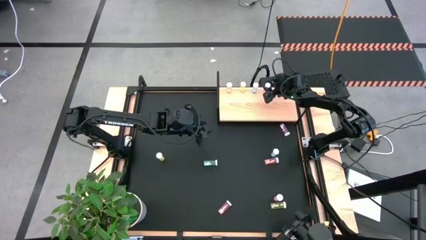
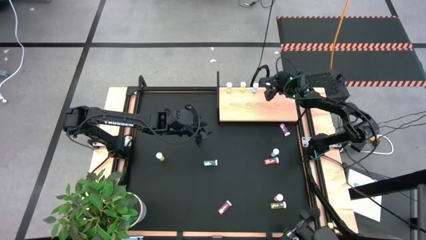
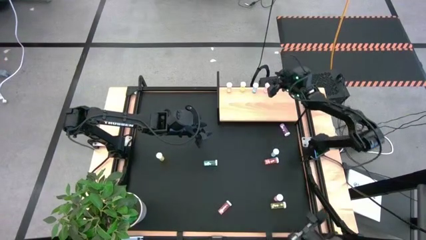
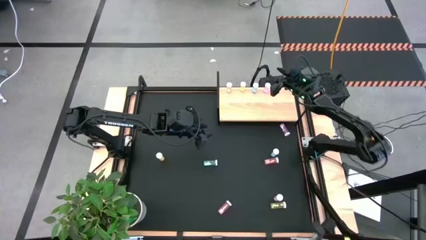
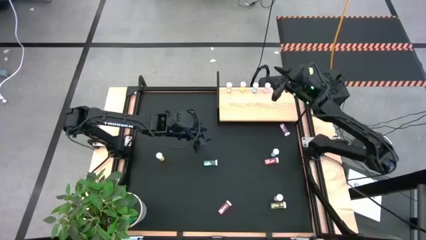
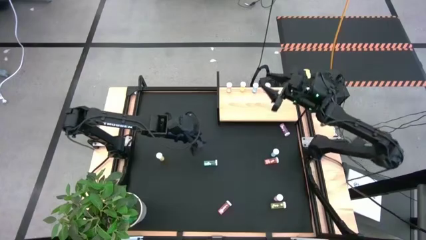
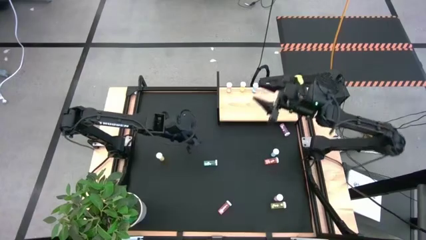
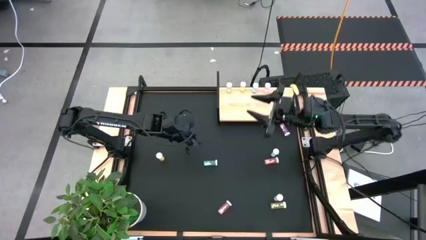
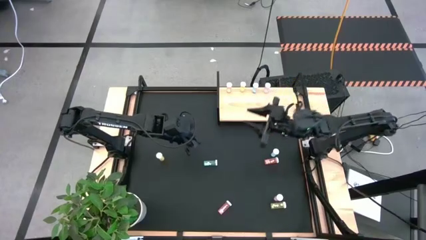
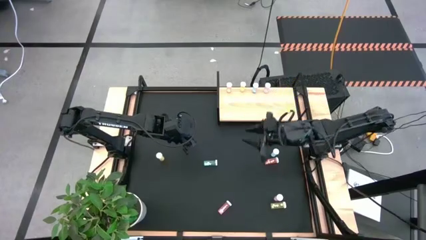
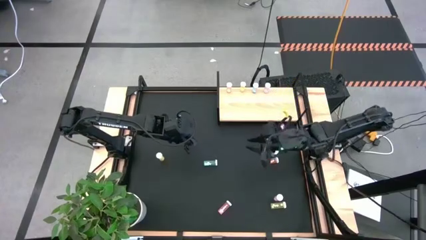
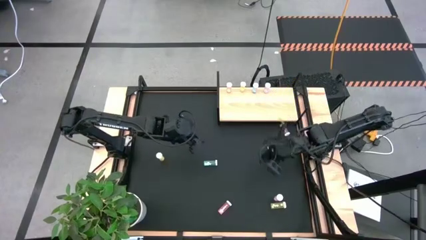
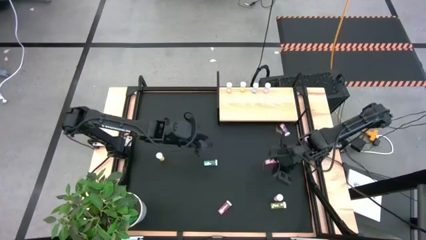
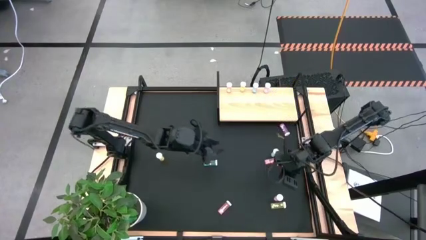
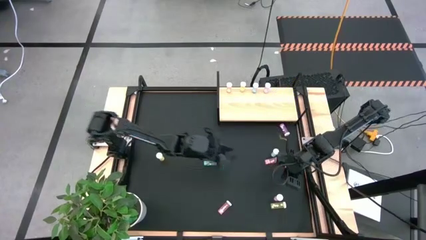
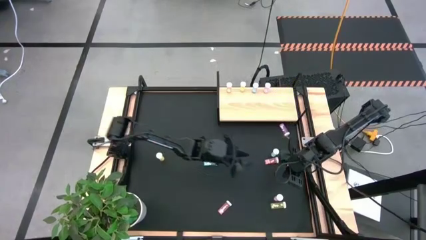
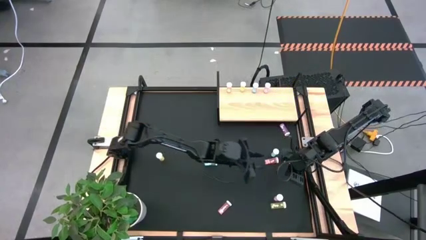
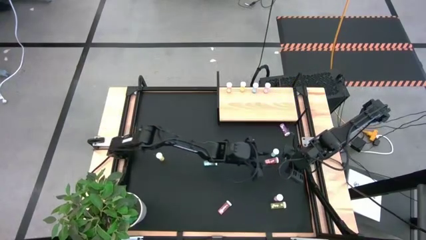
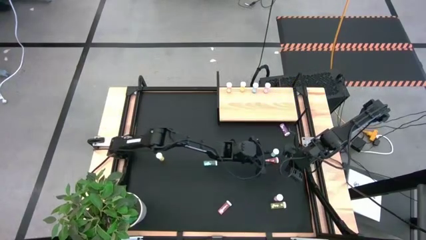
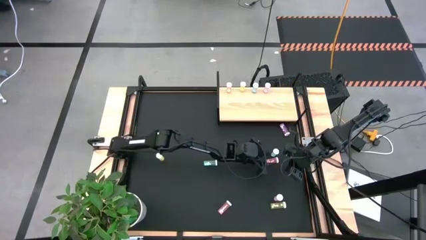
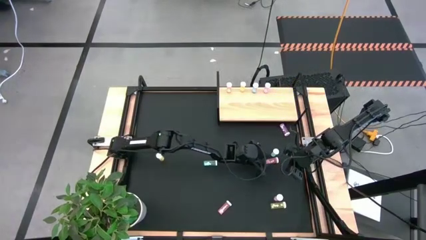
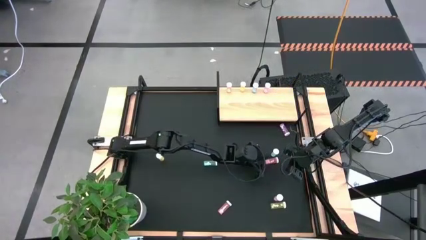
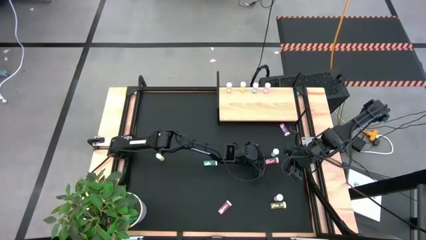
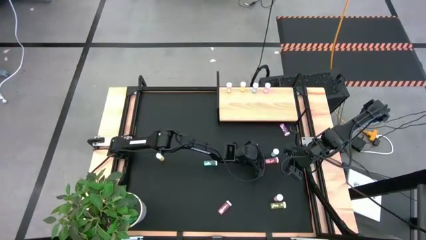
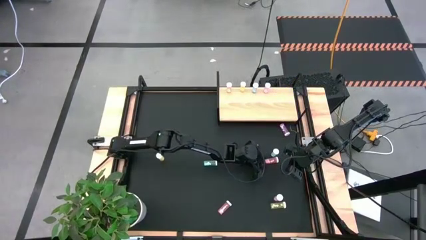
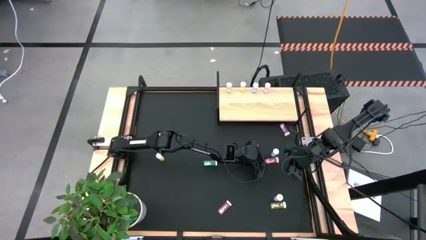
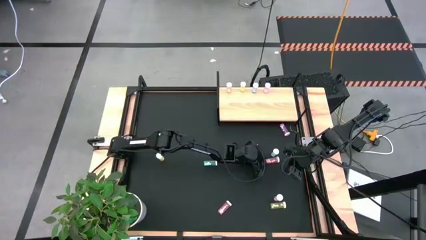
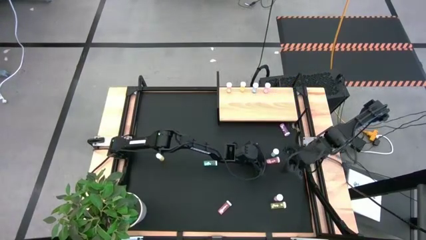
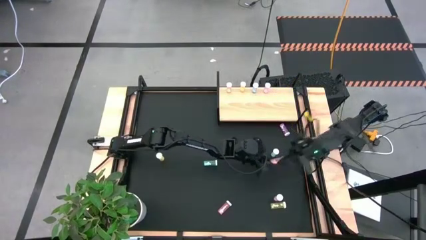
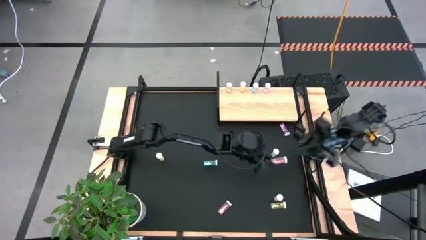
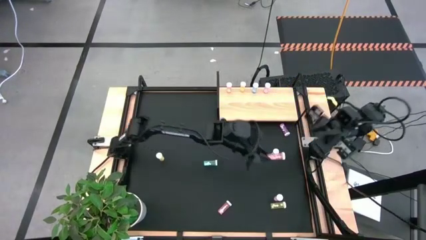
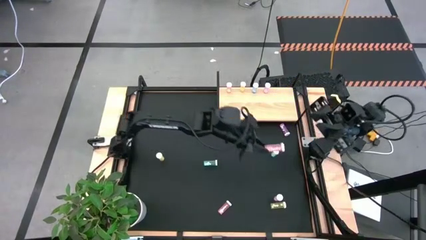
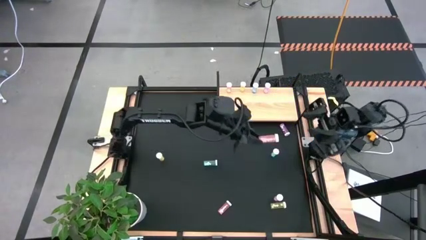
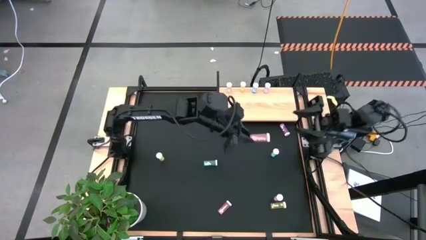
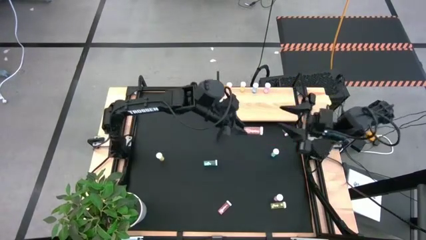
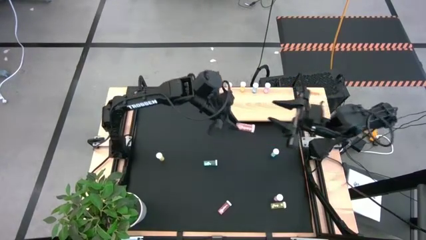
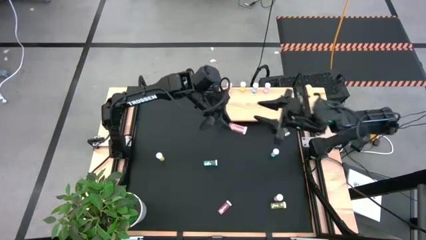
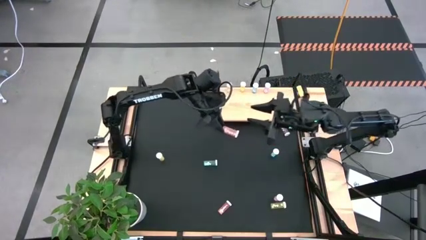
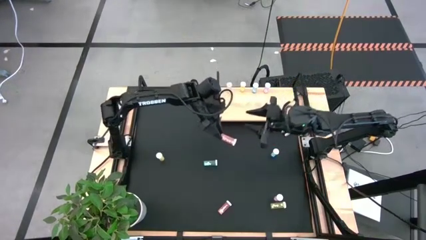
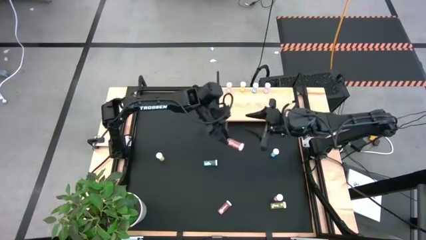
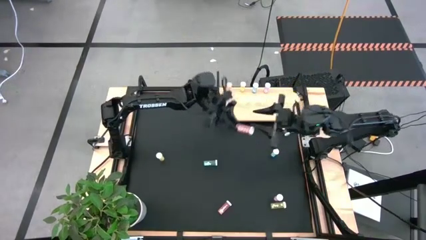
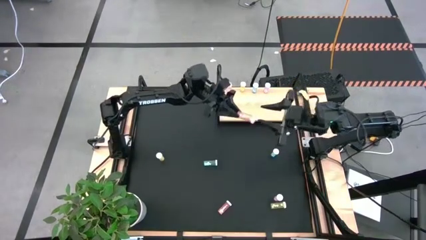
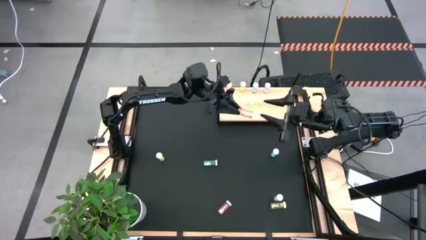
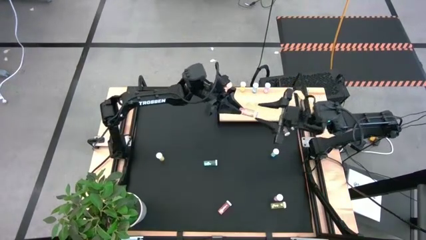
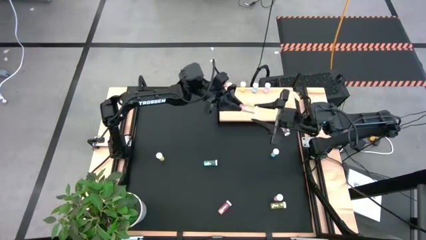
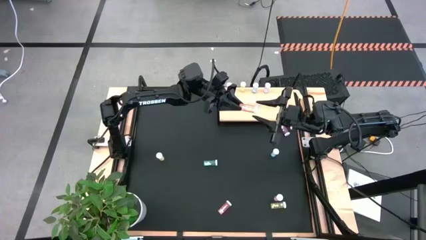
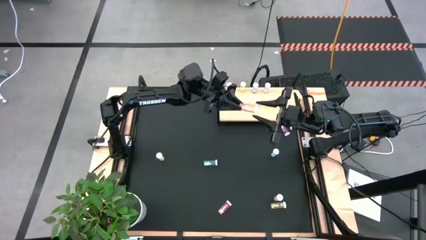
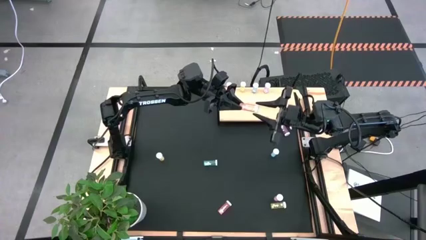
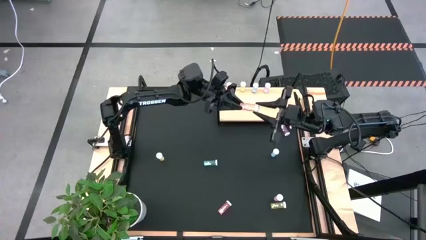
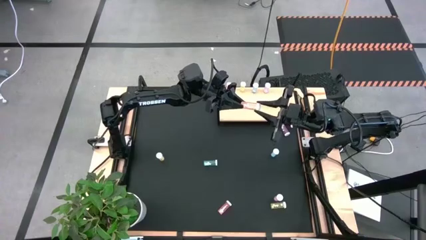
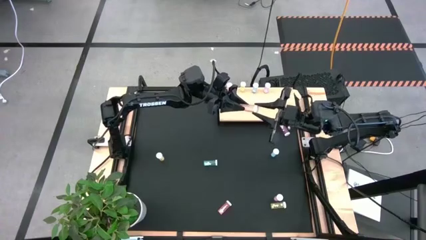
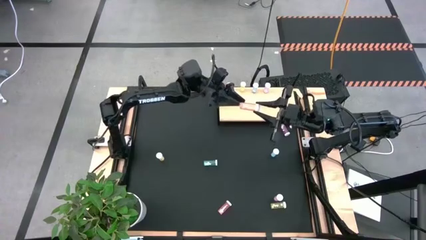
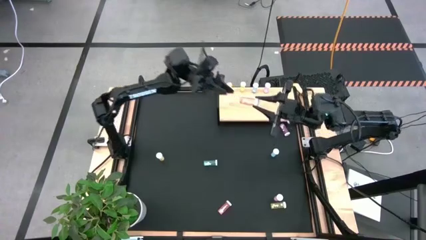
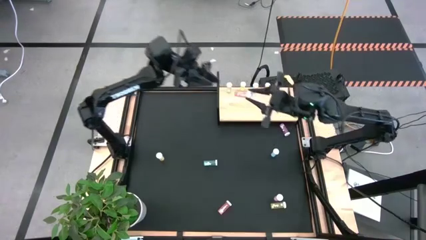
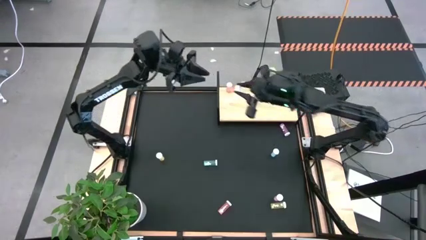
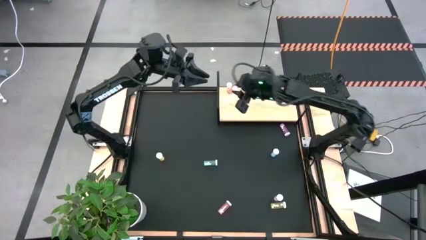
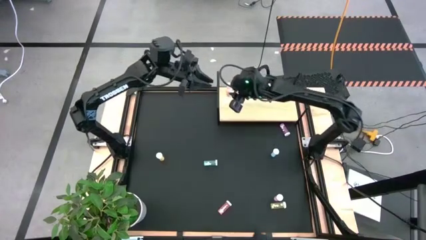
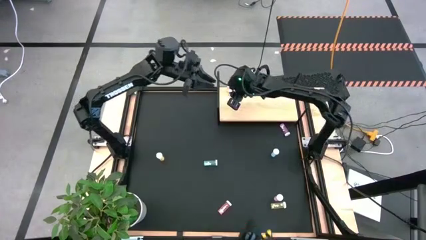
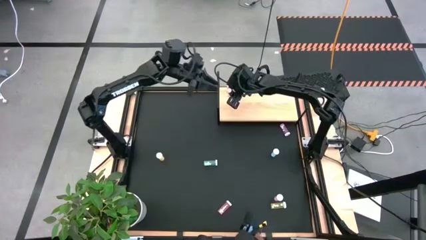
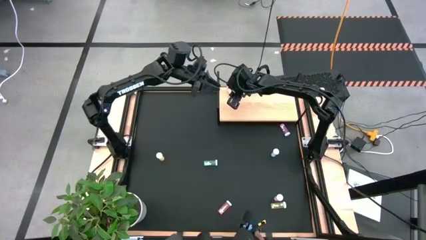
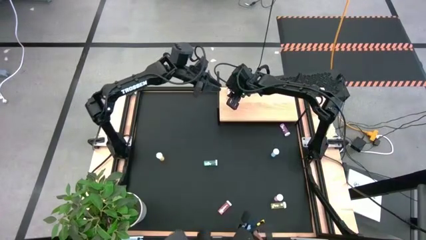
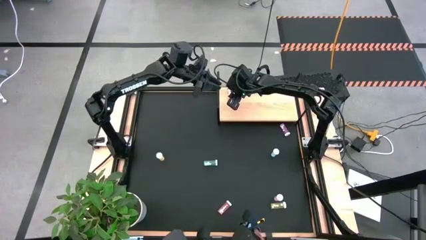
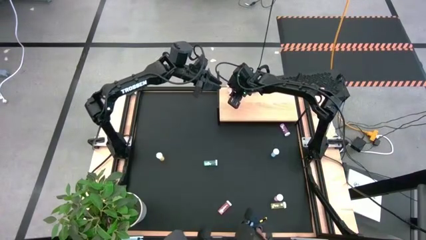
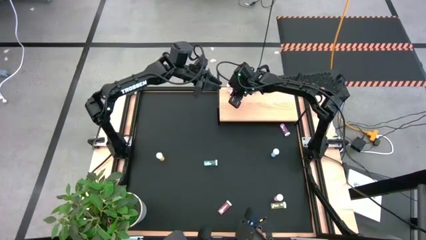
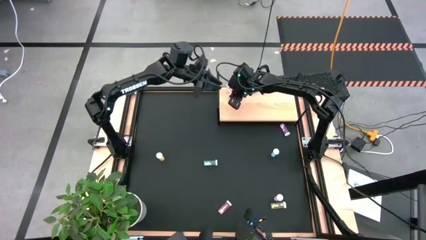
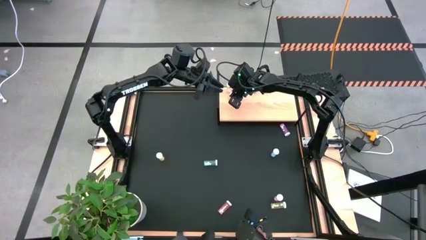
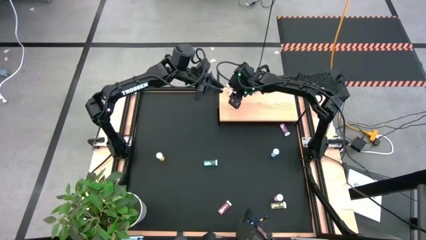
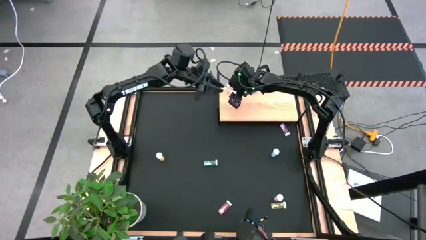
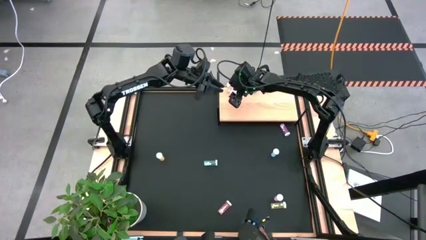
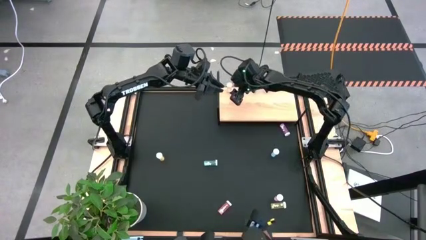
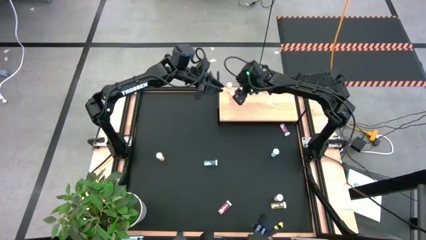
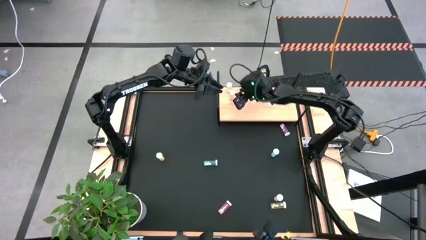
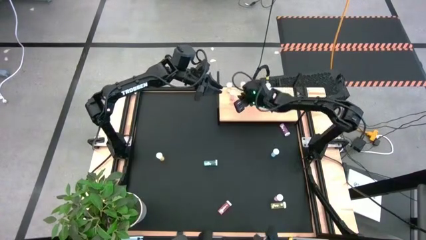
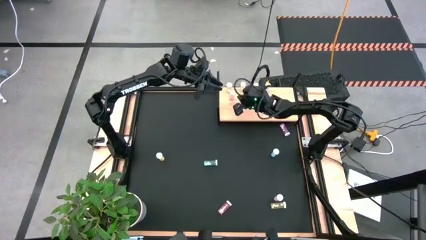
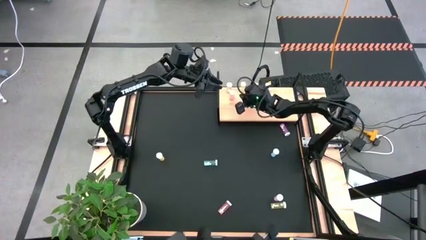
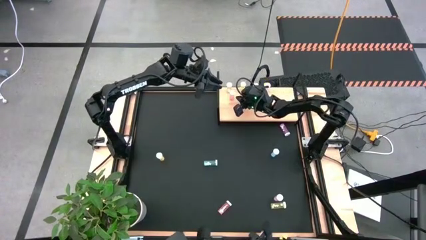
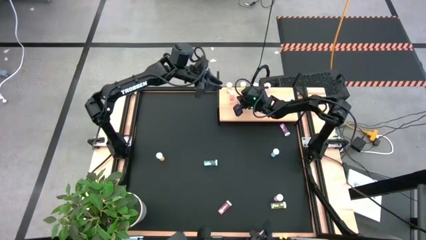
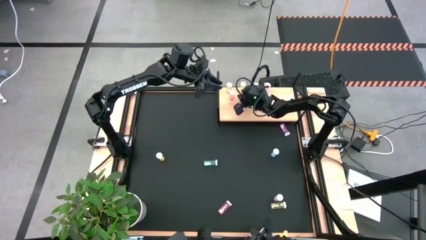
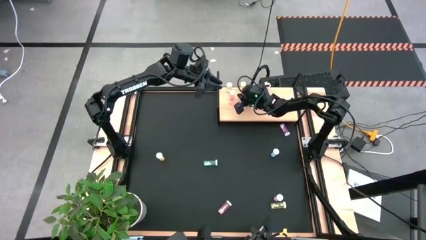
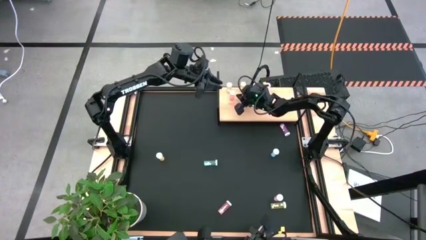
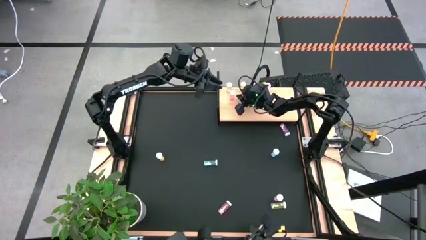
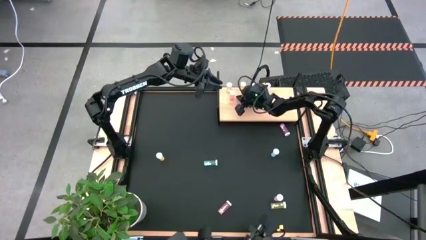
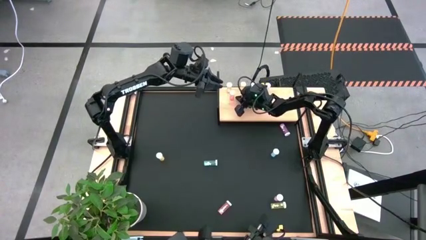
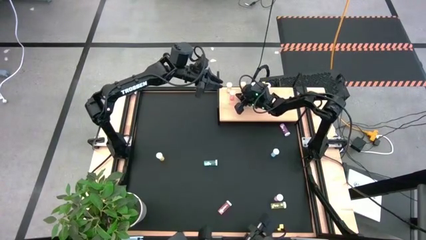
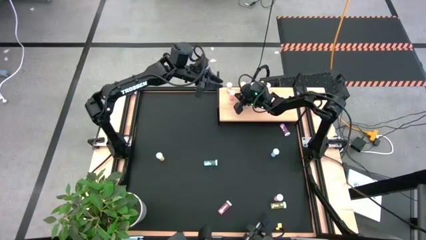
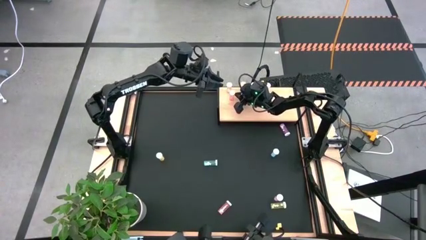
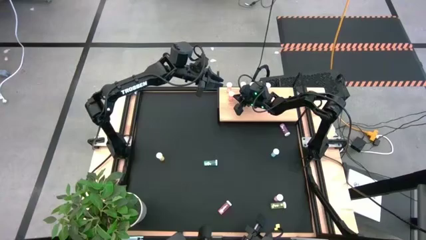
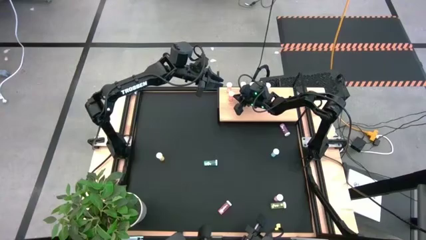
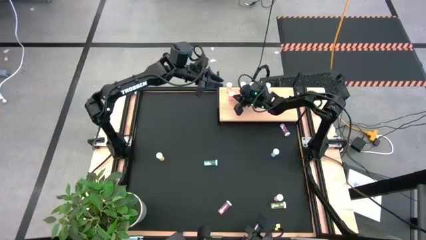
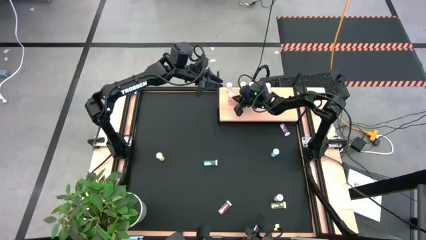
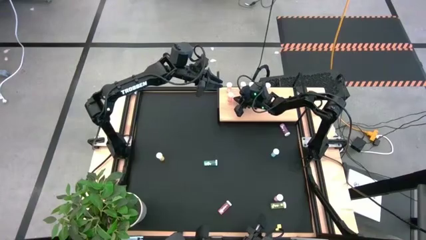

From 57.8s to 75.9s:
Task: Pick and place medicine bottles onto shelf by color
Put the top pink pill bottle aligned with the other pink pill bottle on the shelf
